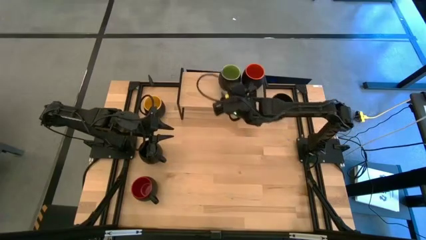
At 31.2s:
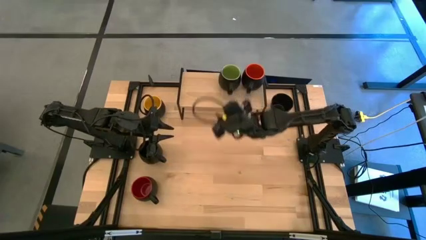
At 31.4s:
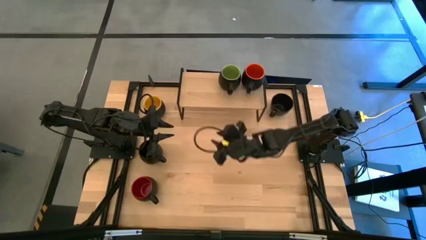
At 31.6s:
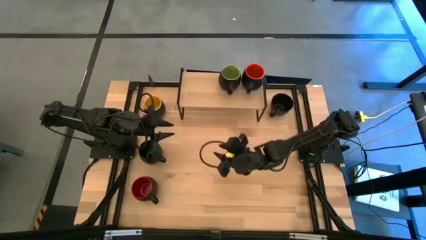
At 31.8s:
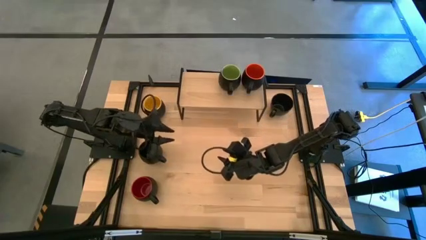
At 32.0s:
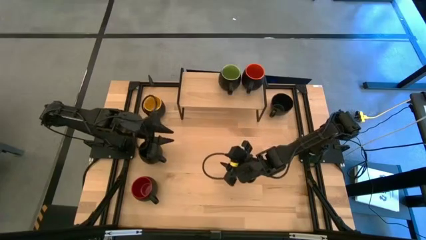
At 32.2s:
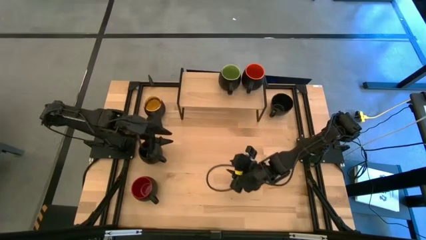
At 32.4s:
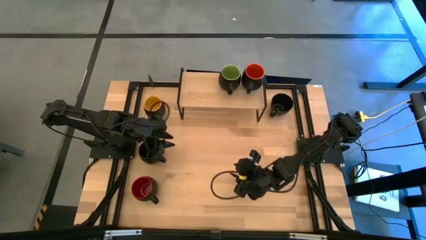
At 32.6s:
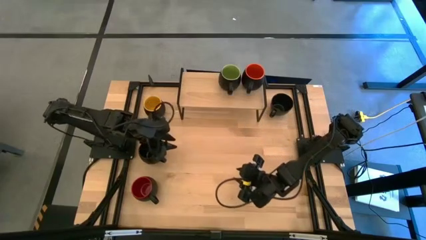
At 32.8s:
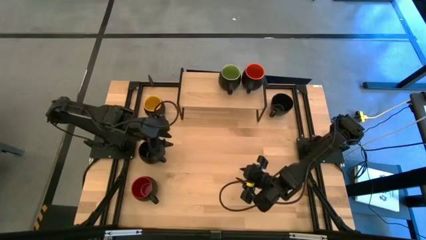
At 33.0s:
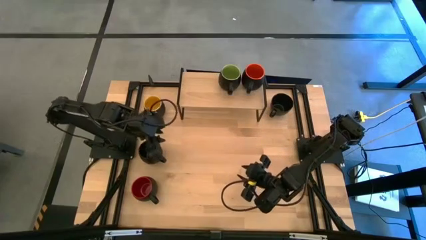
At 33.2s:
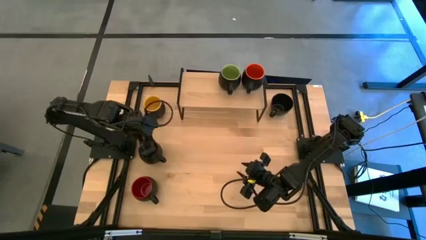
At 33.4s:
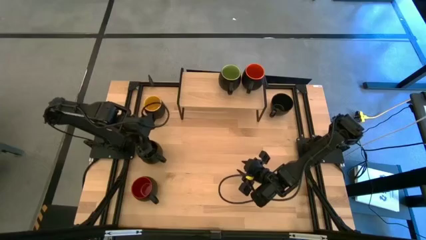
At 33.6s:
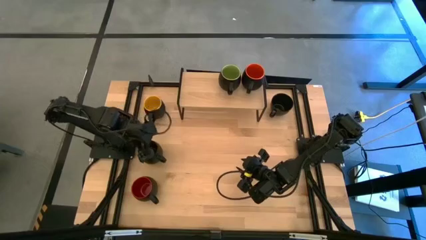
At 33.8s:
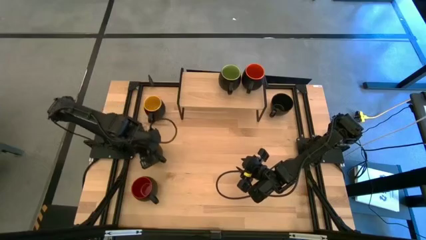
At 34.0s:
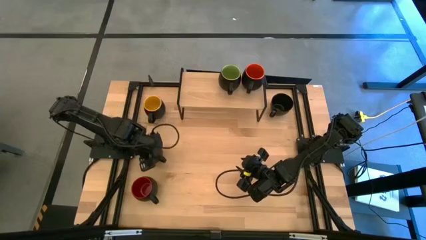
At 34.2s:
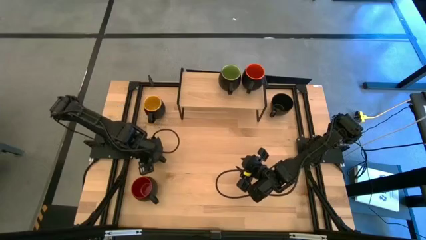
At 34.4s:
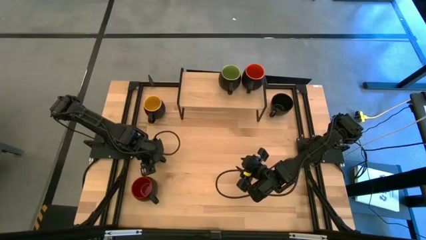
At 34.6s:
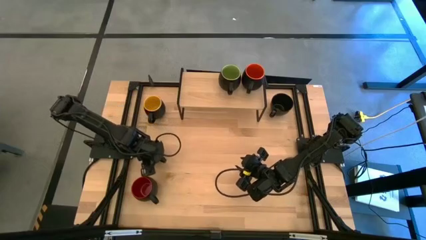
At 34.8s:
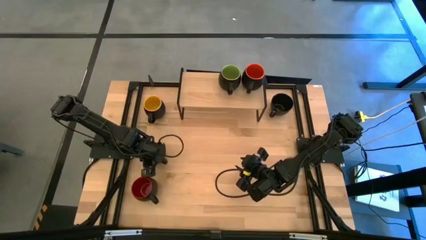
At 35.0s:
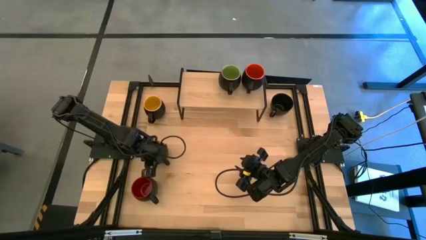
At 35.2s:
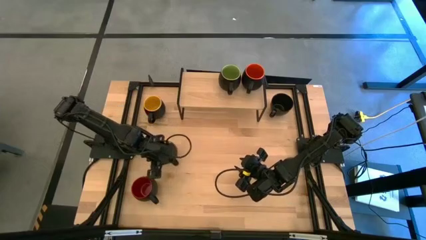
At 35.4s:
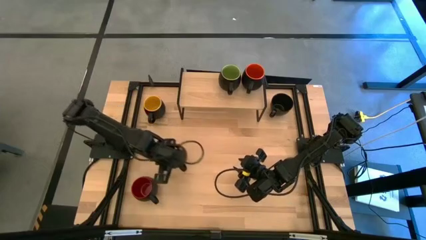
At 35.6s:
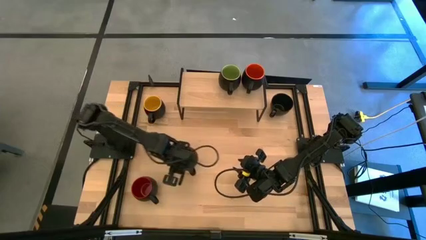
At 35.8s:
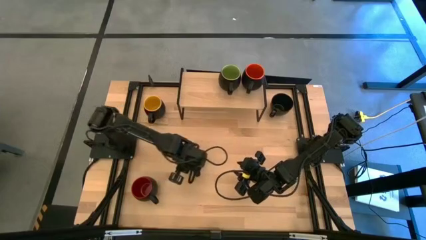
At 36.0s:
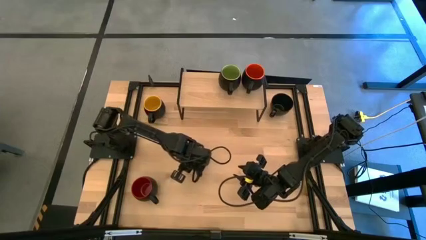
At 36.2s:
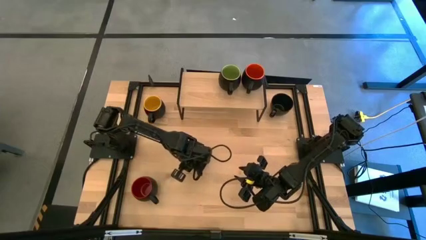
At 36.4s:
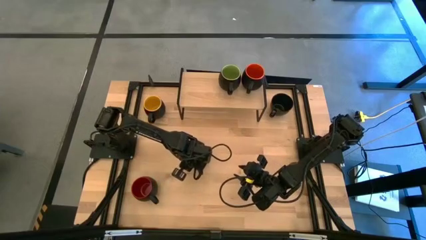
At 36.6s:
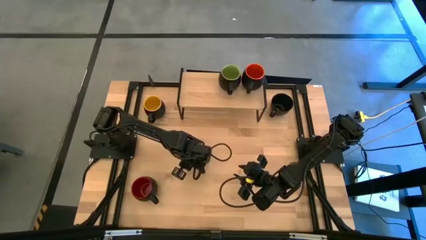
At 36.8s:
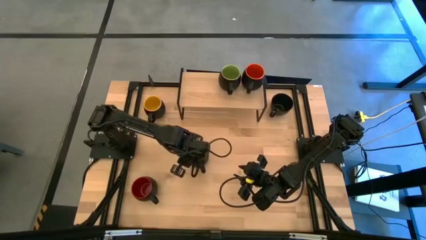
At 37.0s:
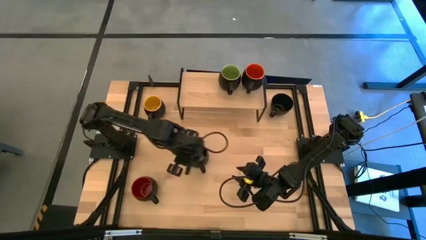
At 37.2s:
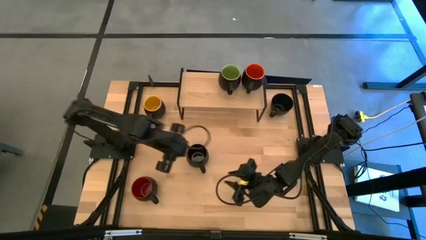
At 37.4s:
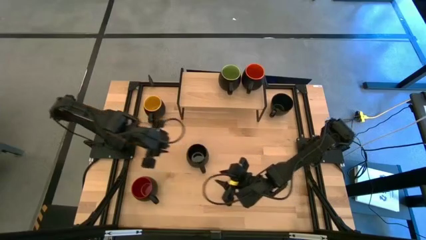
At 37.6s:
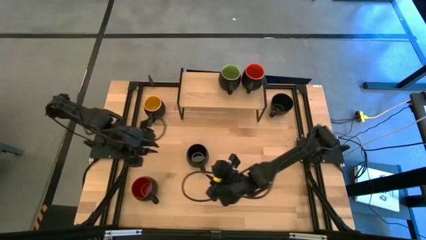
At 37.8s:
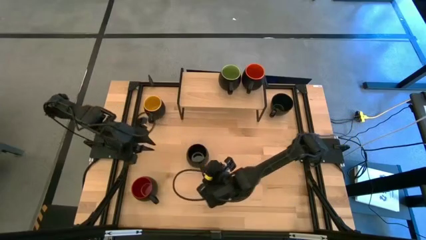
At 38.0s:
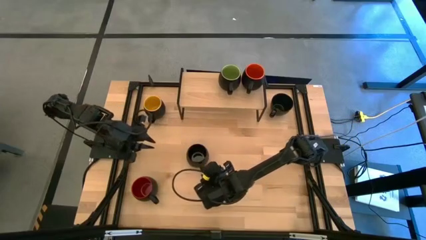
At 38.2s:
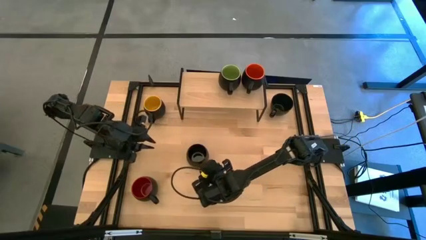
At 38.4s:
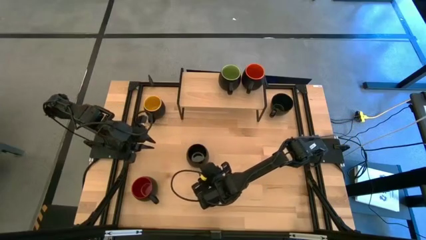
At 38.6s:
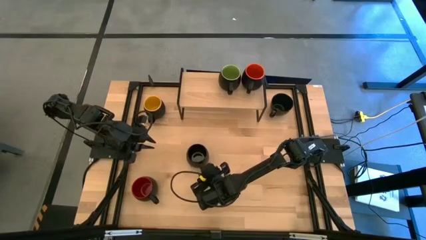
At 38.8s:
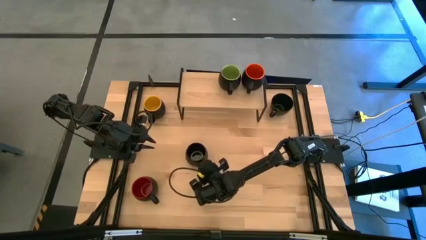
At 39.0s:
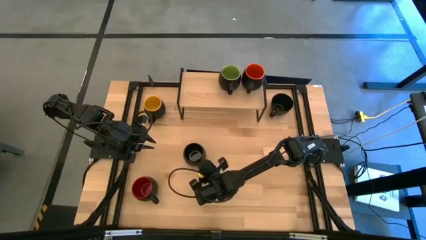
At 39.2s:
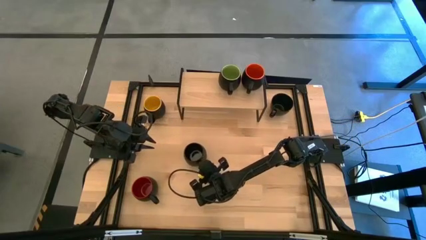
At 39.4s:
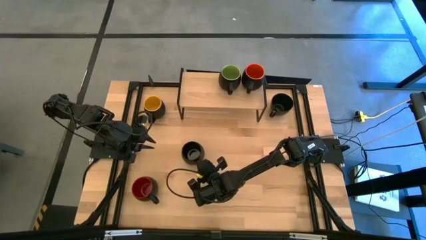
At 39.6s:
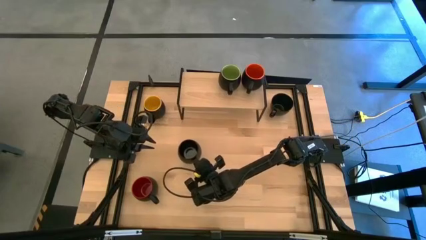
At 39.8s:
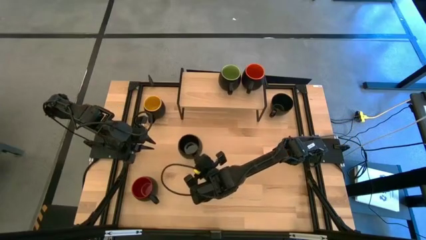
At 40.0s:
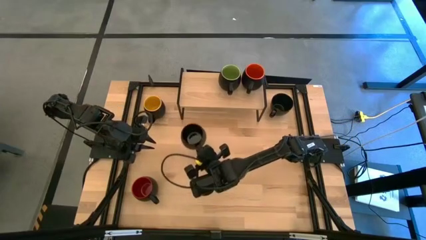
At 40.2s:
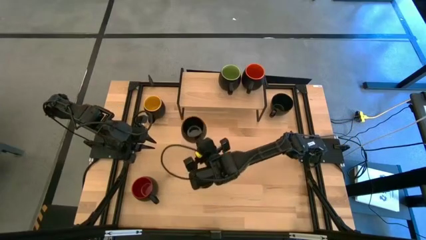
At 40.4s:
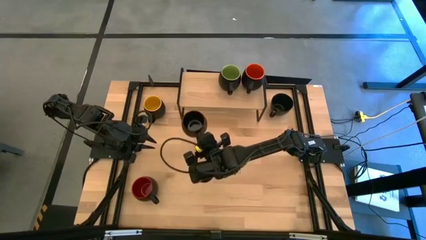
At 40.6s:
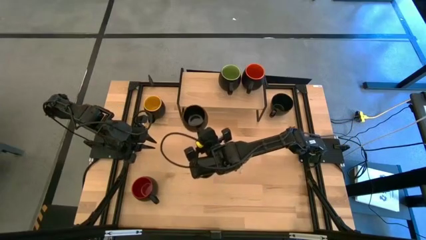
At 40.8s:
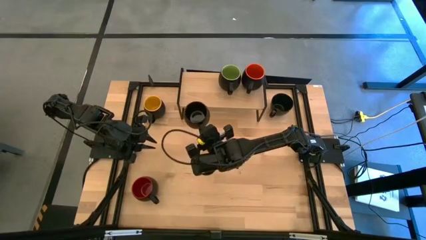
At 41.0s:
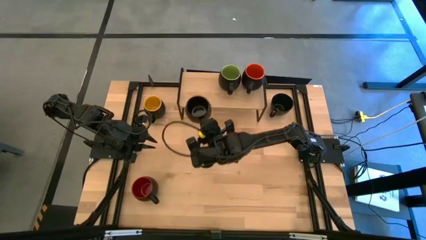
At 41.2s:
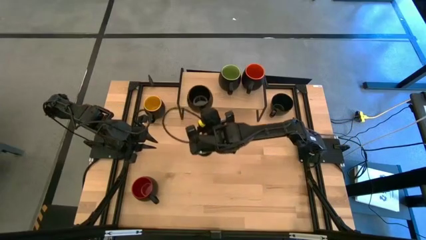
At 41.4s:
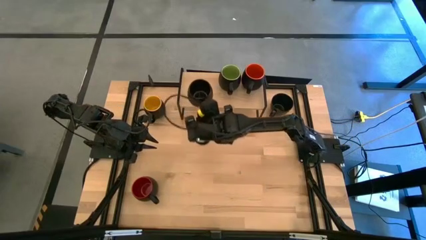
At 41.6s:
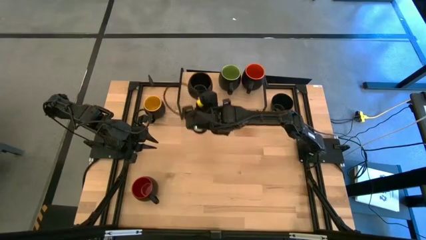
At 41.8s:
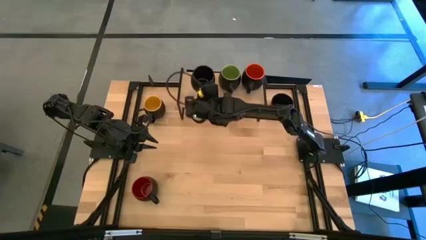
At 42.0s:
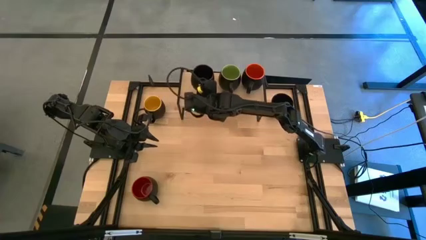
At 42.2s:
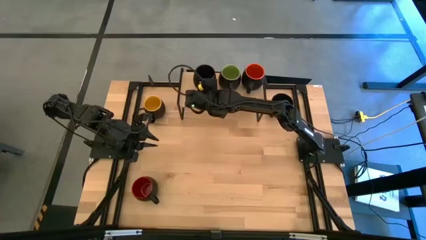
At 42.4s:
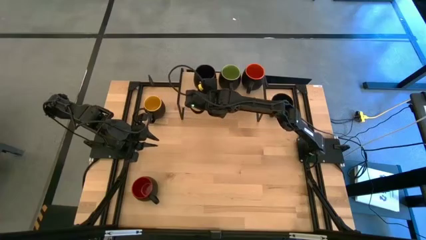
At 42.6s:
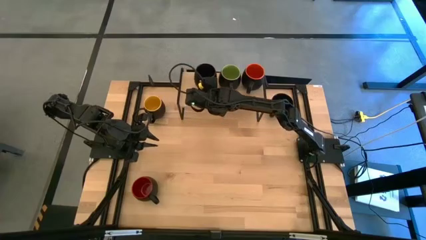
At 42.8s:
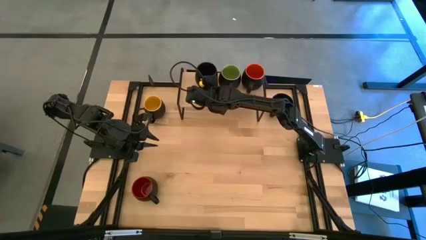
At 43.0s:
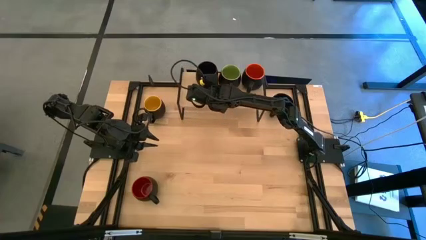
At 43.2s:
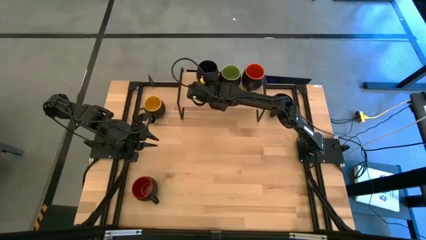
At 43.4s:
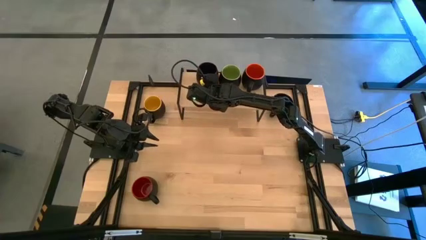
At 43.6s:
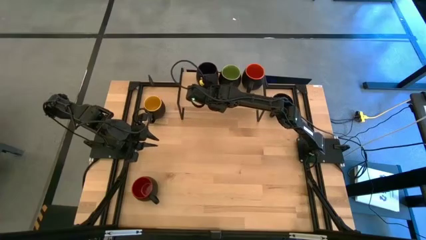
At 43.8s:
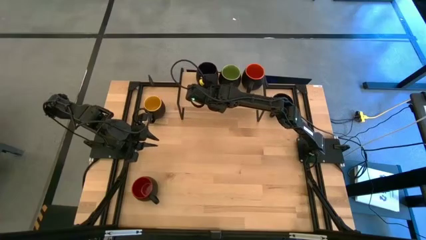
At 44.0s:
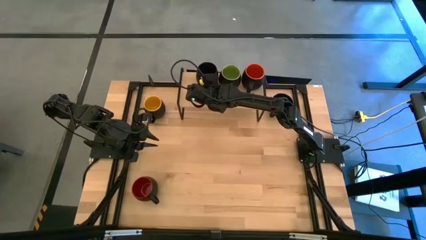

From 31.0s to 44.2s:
Task: Place coffee mugs
Put the bottom black mug on the shelf

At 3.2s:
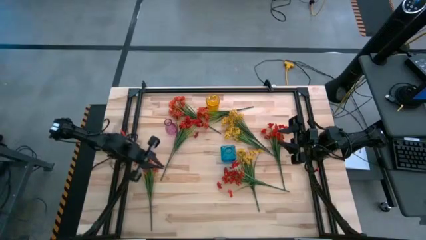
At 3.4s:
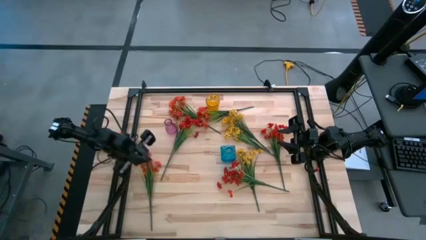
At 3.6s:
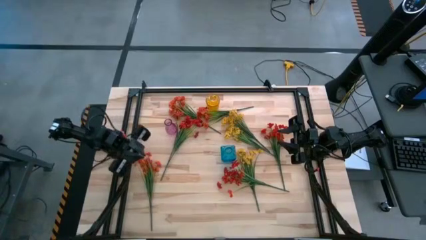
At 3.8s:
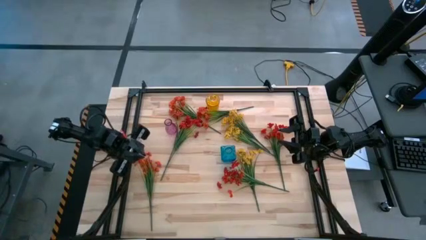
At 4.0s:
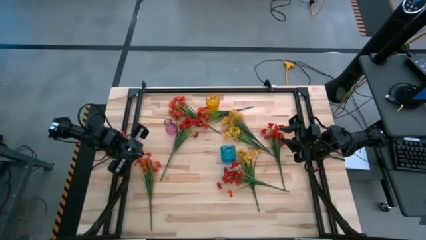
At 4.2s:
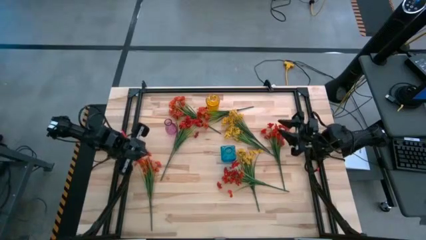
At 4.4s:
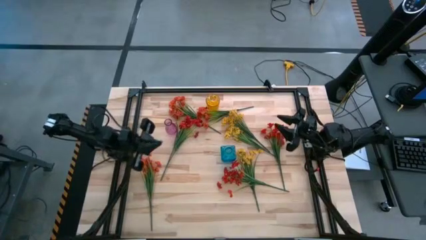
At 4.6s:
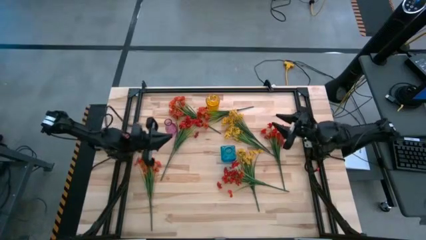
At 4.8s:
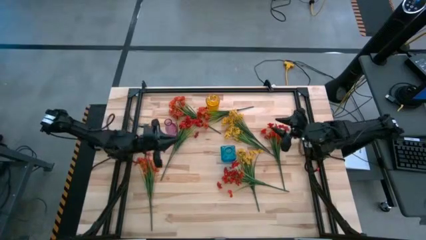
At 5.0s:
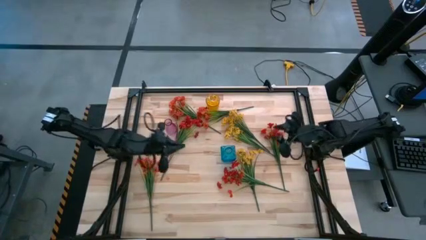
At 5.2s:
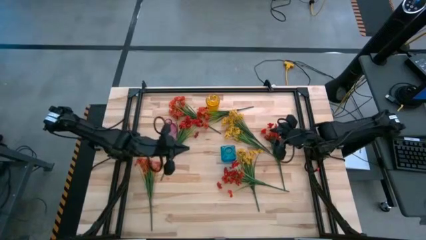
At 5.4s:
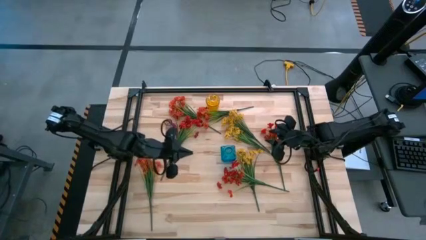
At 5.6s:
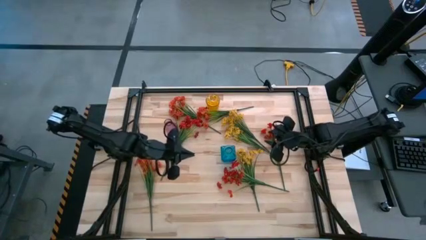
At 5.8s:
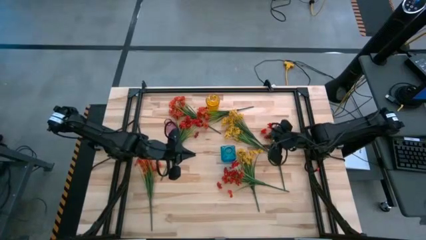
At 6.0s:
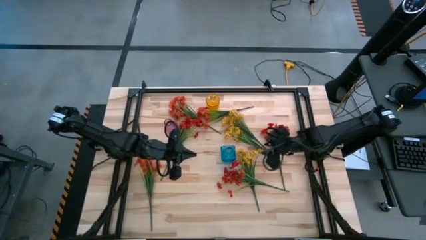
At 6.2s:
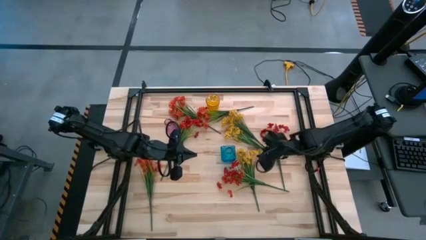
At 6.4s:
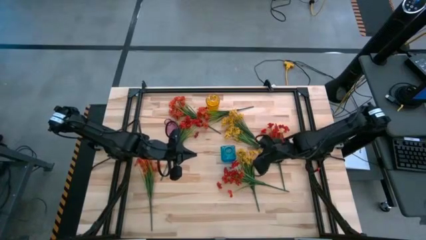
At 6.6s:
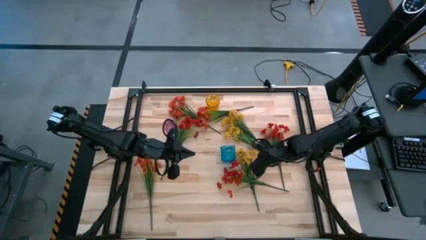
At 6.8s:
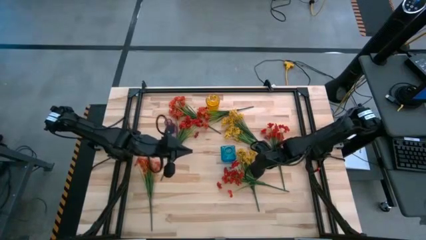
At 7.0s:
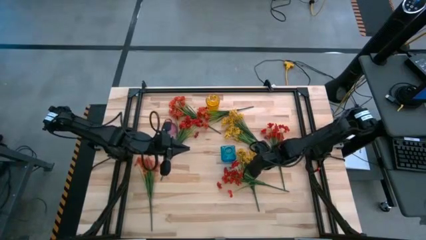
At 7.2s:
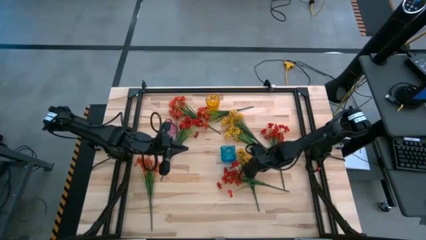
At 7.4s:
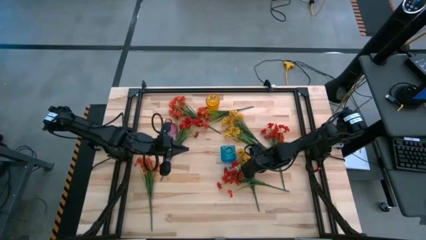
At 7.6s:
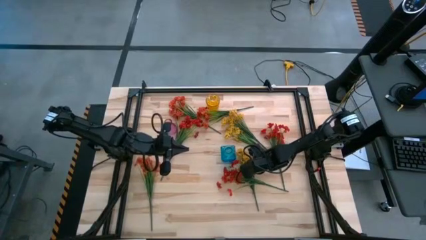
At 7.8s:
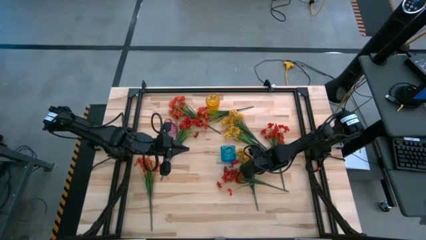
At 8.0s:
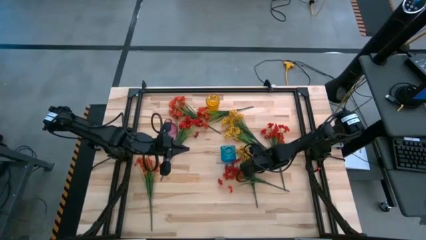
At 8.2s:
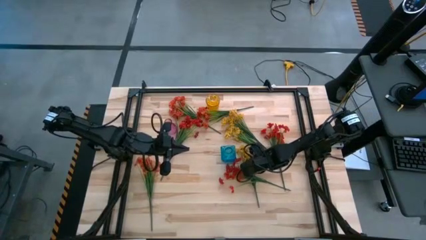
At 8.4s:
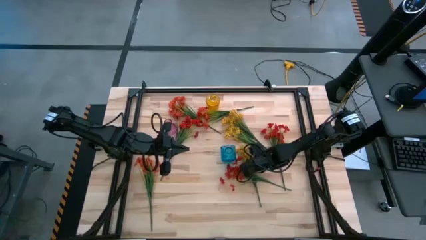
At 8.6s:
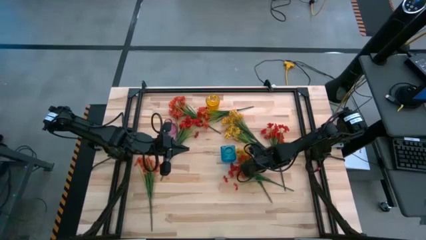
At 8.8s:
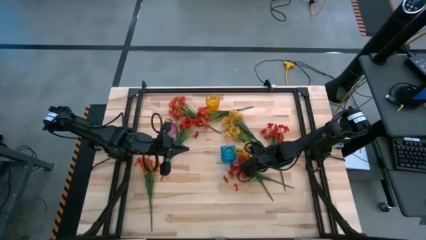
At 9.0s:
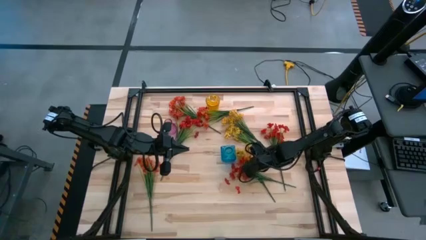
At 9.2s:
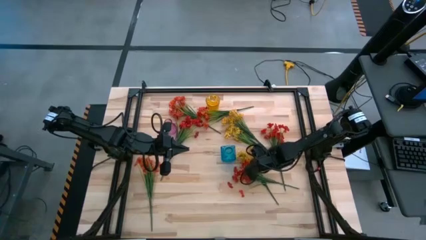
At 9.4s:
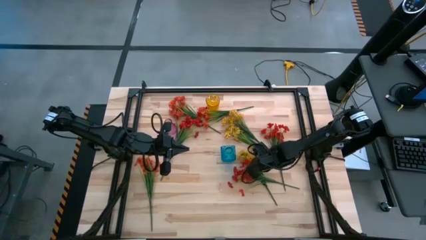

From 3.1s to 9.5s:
Task: Sort flowers into vase by color
Put the bottom yellow flowers into the blue vase
